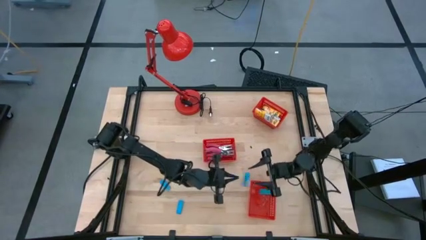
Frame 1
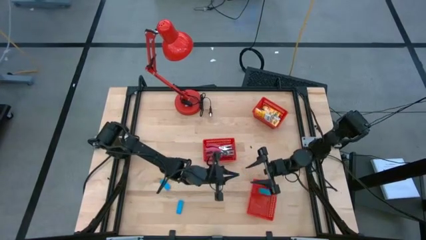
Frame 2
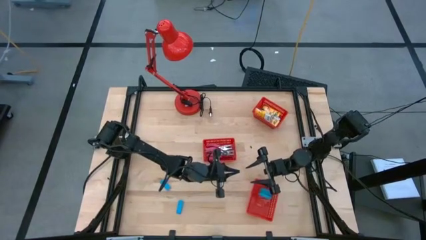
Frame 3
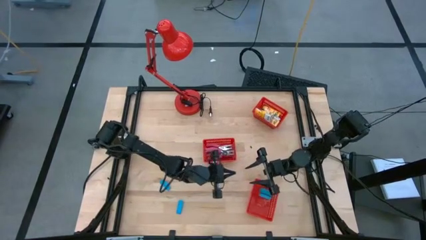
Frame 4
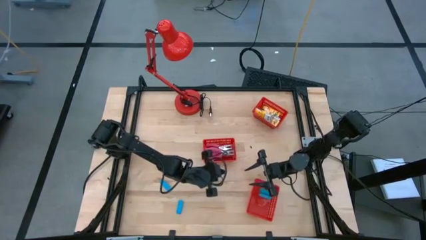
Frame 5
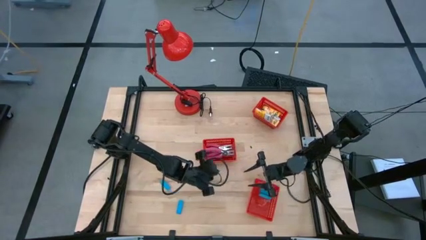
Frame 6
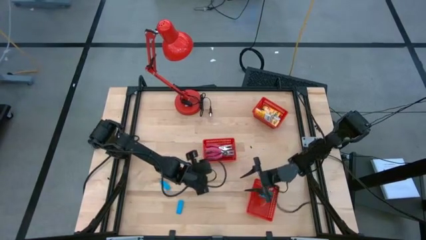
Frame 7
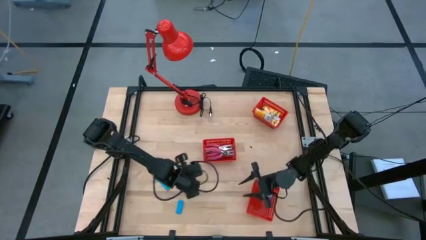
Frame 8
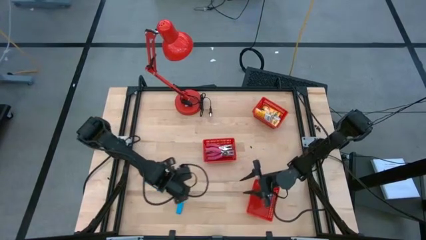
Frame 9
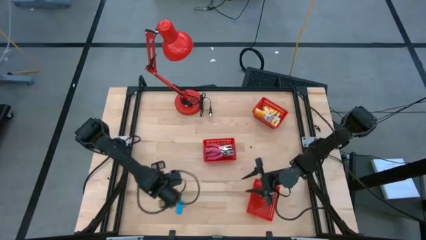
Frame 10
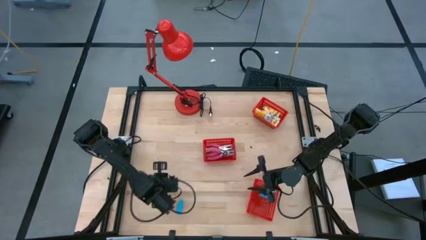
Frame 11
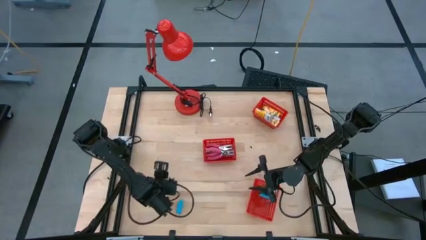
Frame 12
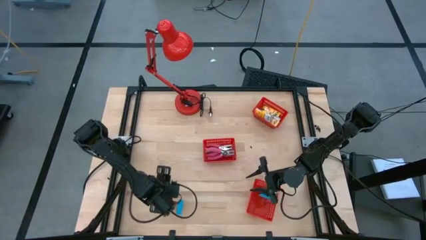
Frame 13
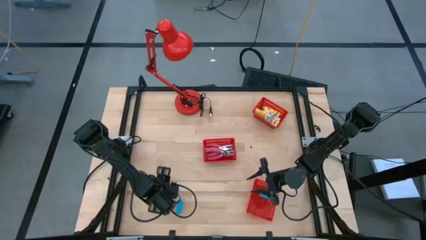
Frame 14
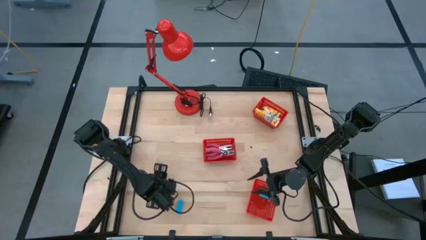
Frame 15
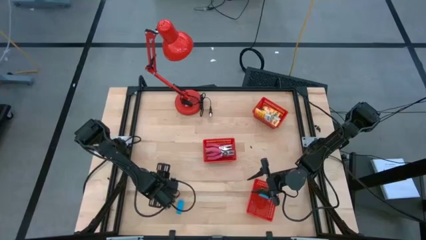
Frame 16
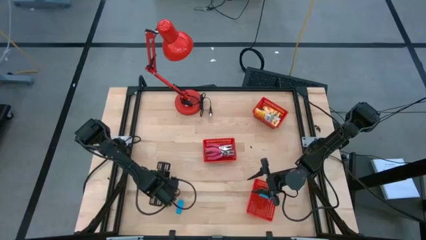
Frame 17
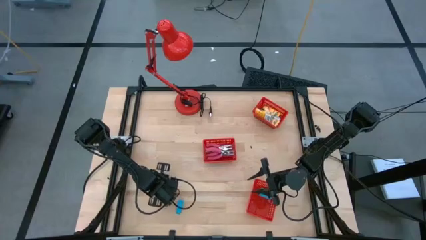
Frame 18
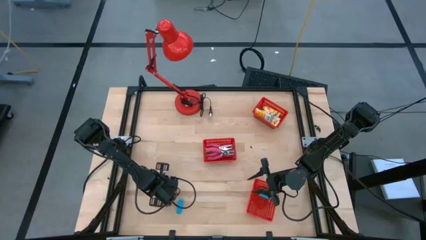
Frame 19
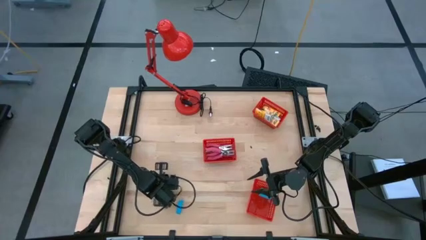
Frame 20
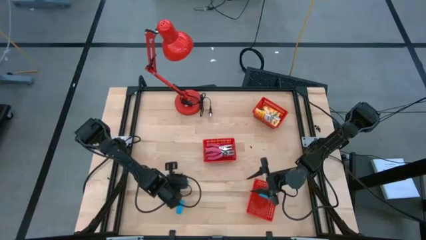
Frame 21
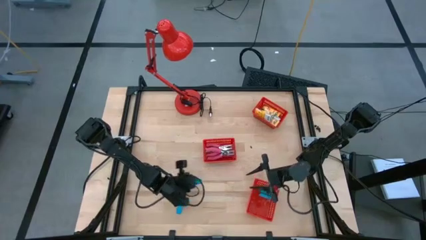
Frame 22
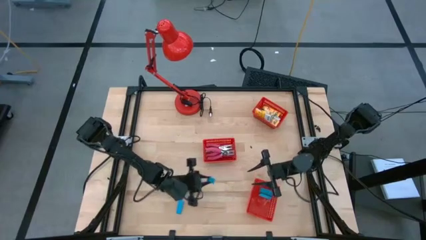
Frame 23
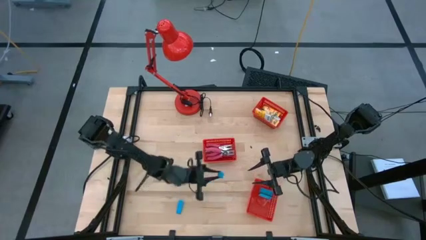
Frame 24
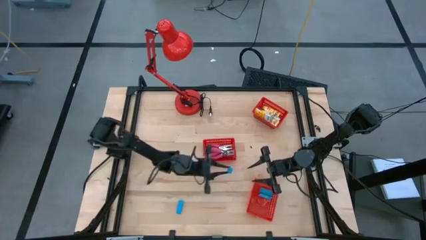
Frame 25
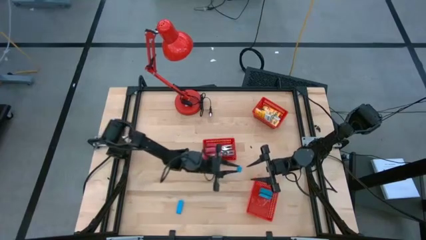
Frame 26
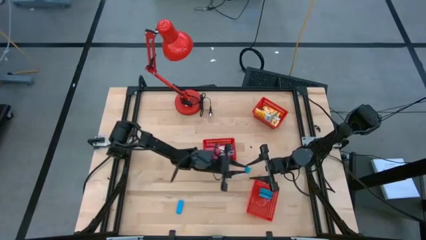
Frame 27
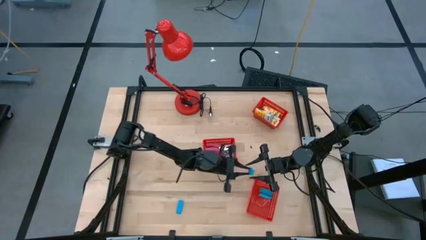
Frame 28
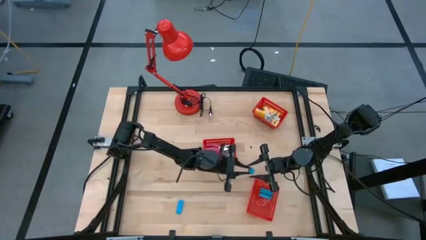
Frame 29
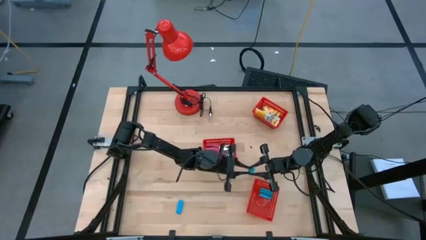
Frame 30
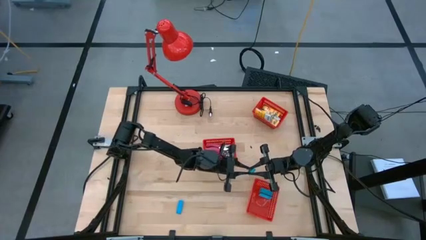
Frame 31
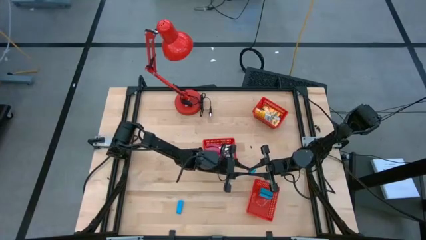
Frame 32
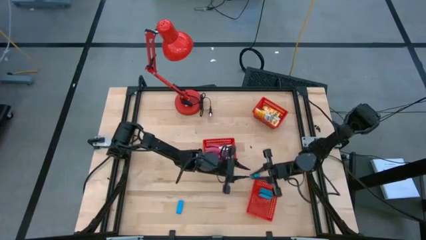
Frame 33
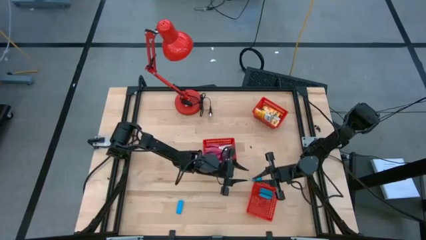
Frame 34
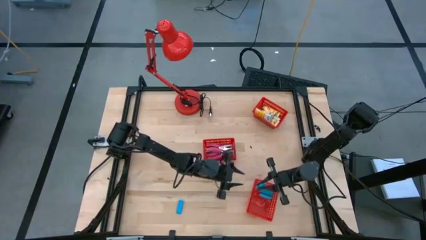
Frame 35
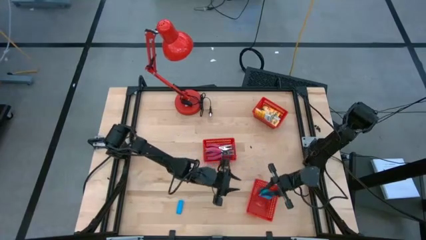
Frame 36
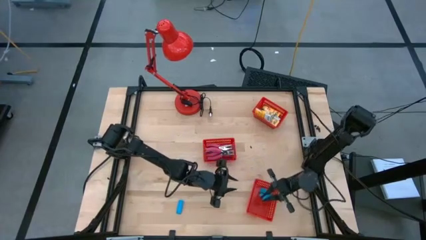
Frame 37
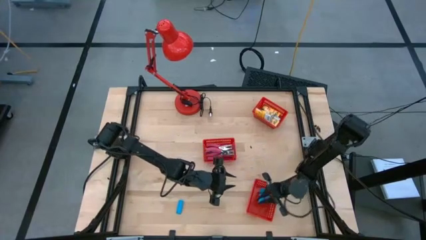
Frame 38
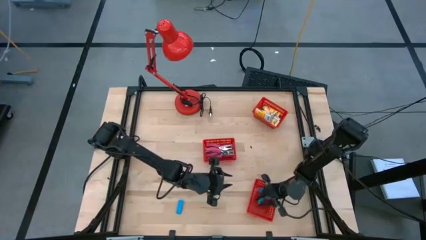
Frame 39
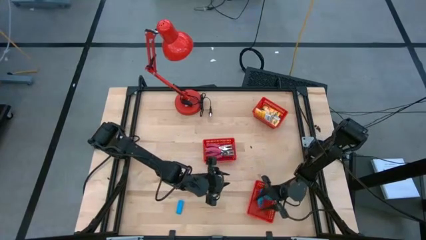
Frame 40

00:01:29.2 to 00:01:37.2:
Task: Pick & Place School Supplies
Put the blue eraser into the bottom red bin

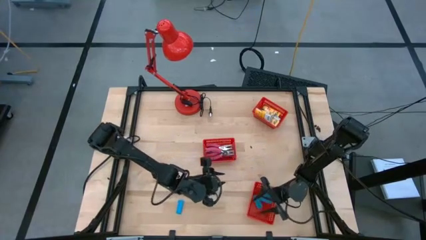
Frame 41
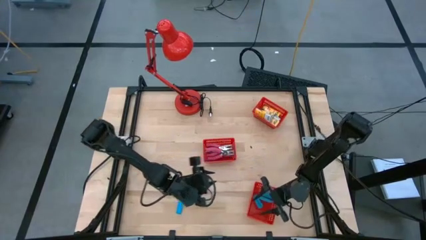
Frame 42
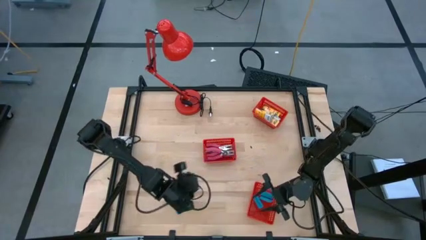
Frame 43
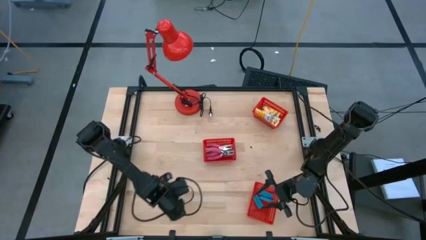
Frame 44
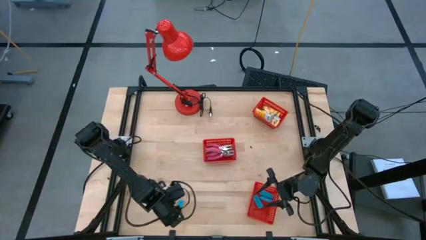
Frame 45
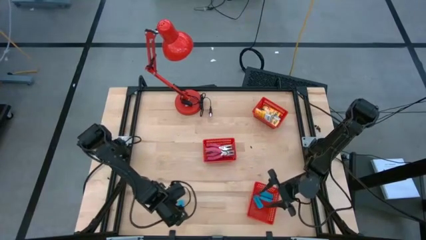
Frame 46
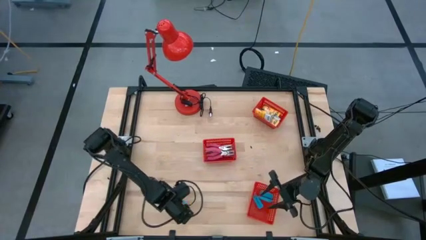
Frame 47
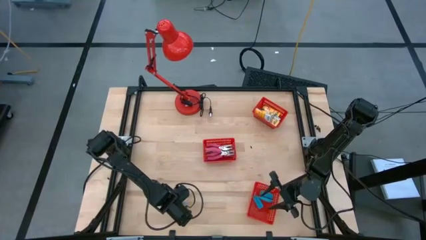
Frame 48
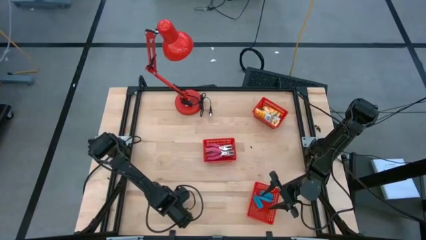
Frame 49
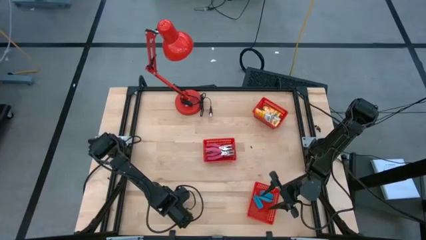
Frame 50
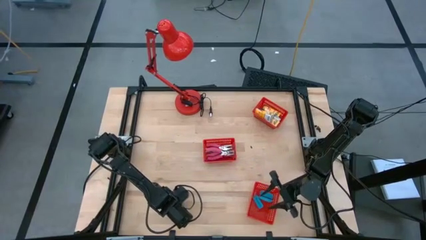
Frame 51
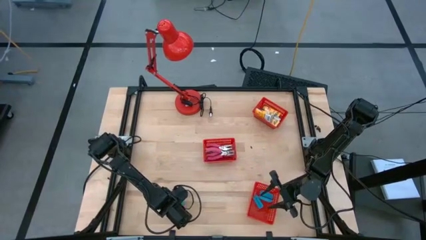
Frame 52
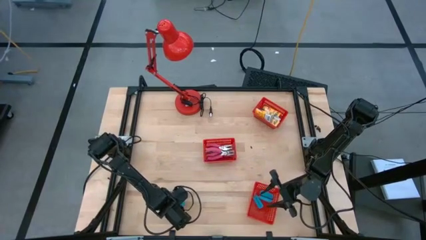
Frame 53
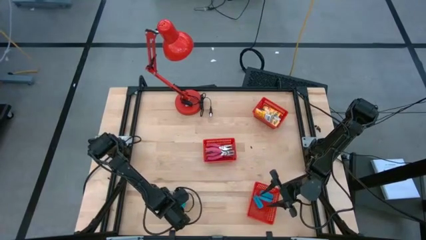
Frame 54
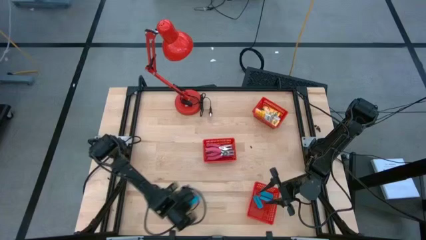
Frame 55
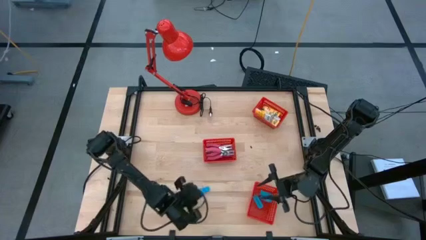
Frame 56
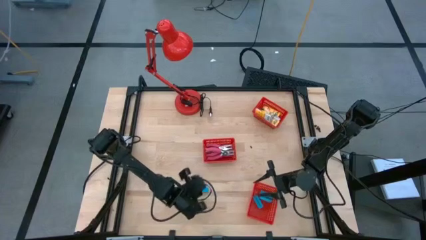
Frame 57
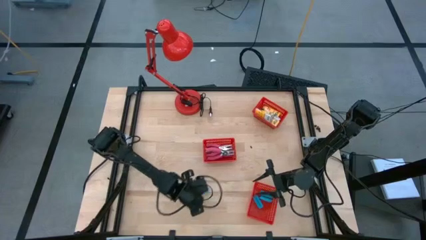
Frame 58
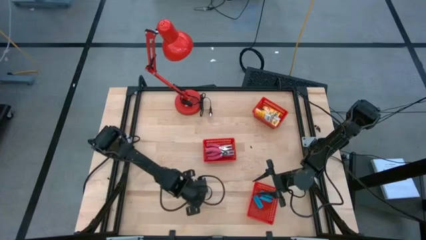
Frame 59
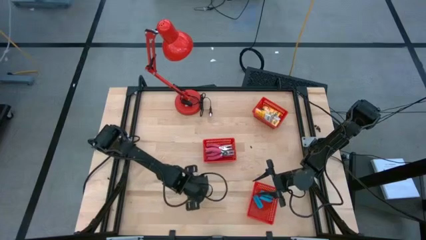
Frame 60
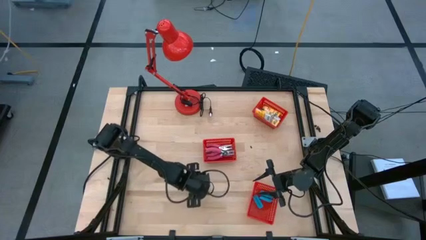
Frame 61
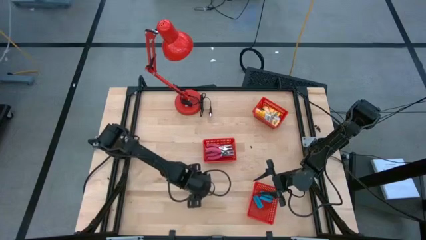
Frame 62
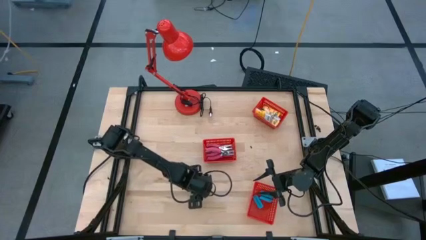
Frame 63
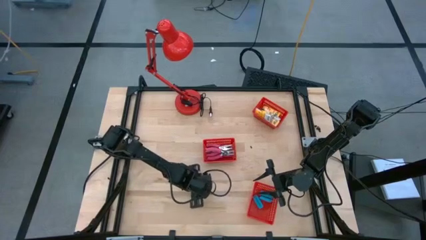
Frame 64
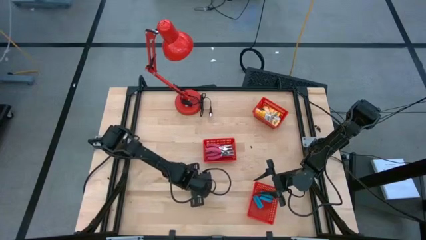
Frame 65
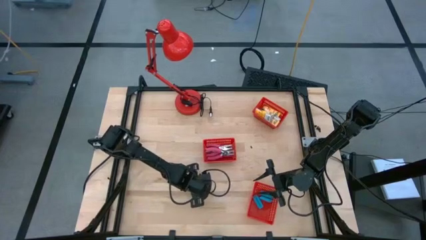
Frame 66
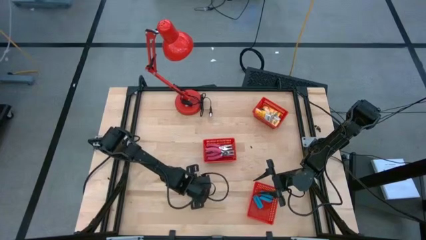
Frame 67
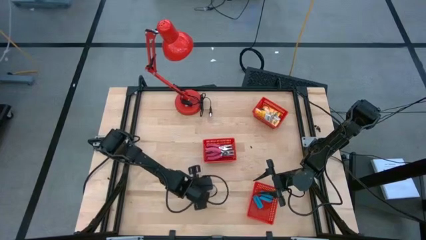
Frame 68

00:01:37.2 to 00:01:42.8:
Put the blue eraser into the bottom red bin
